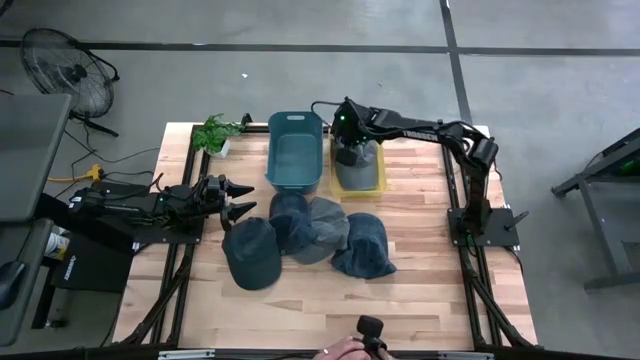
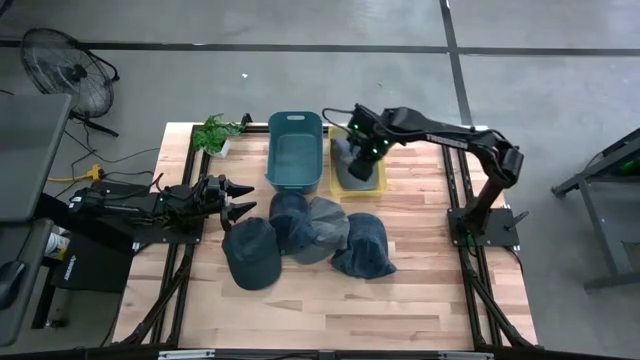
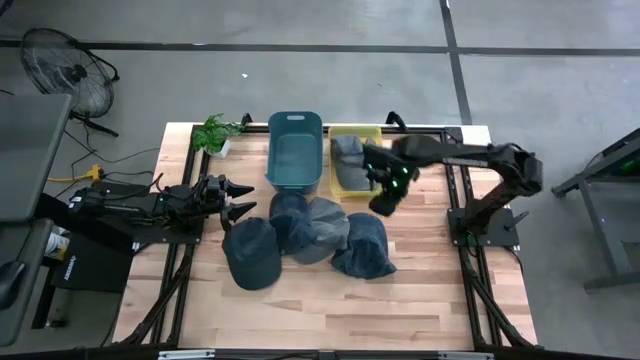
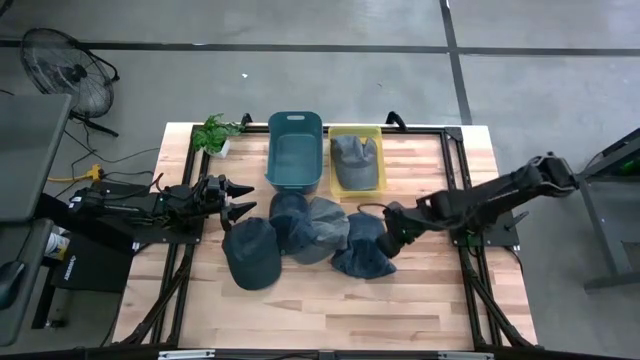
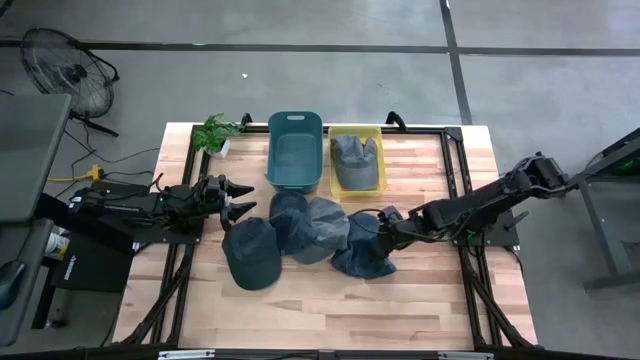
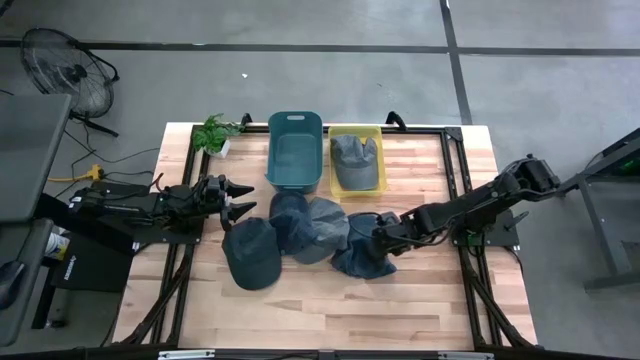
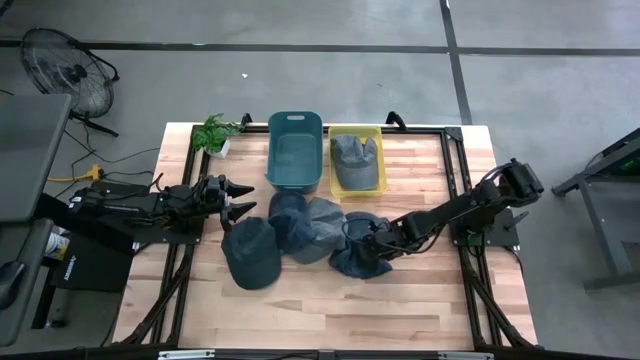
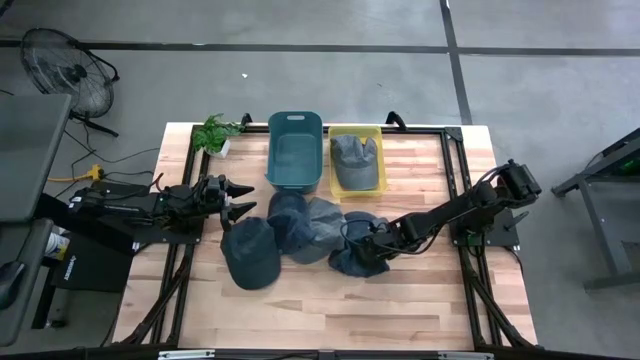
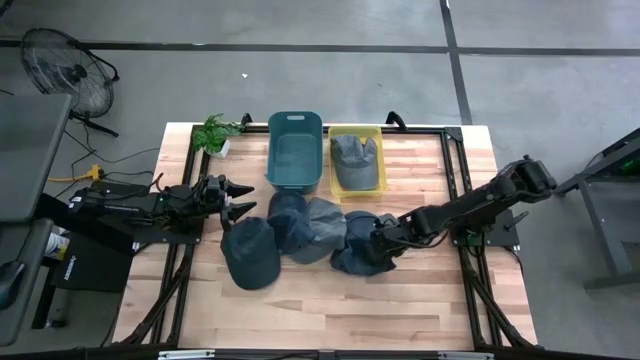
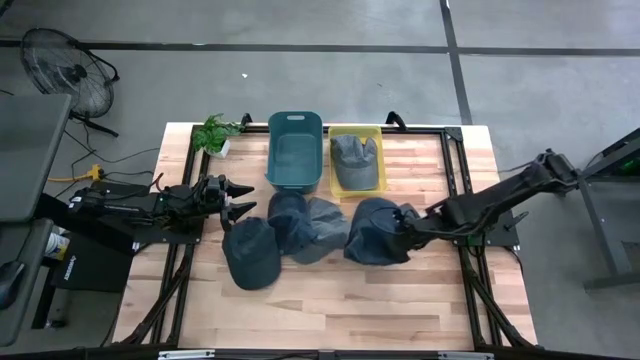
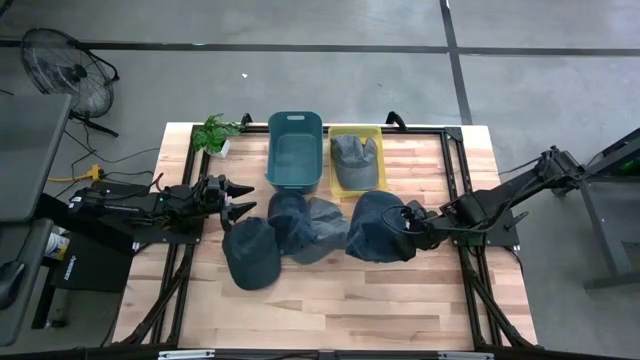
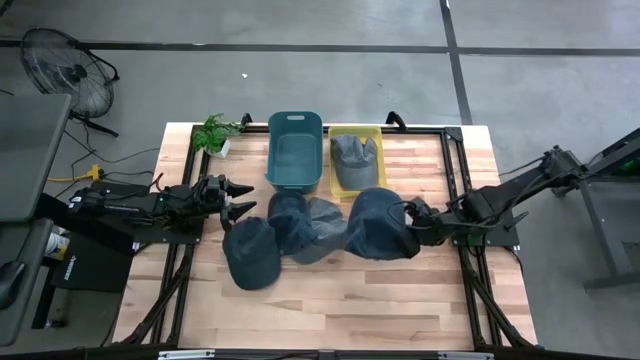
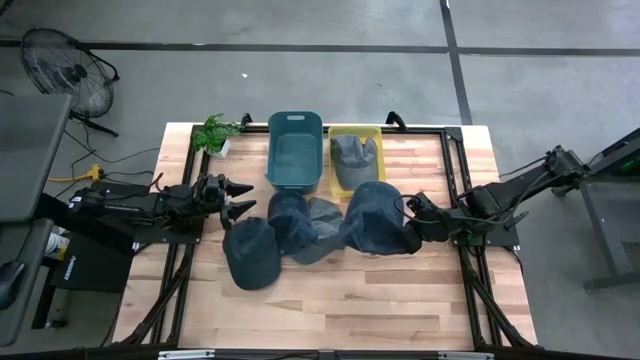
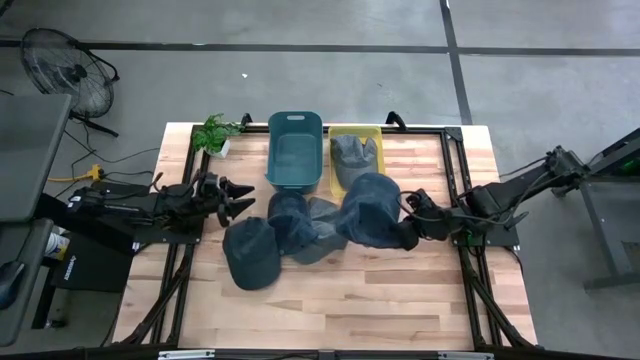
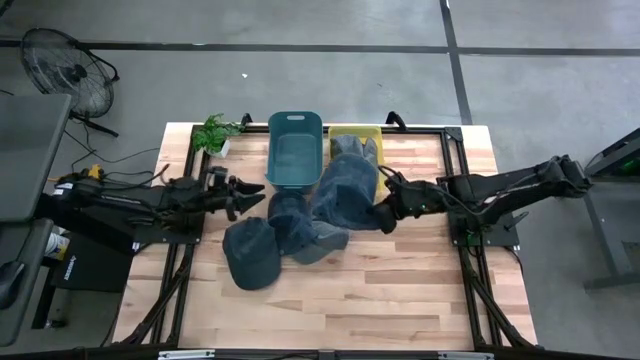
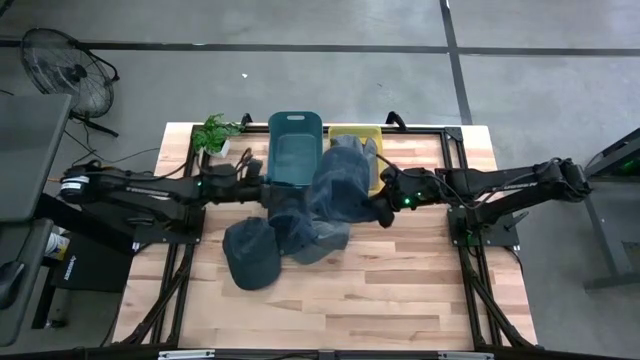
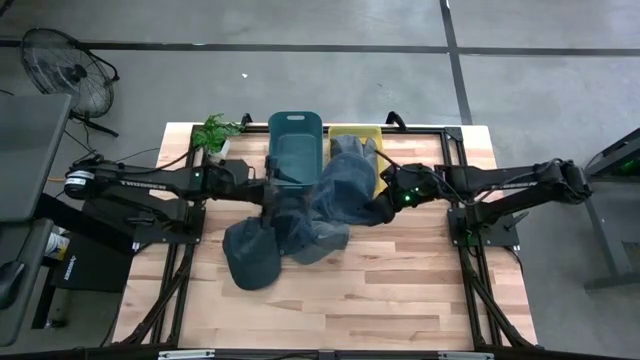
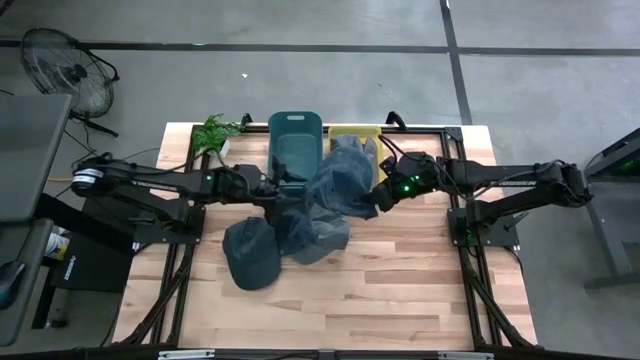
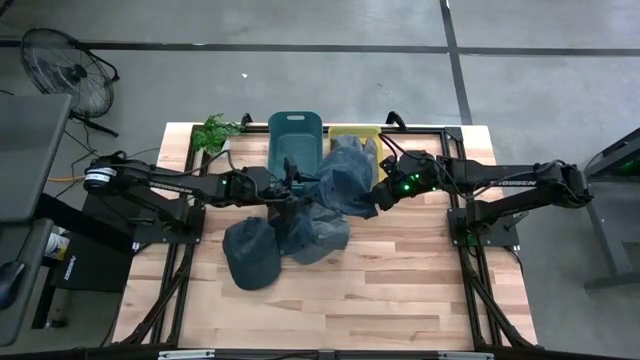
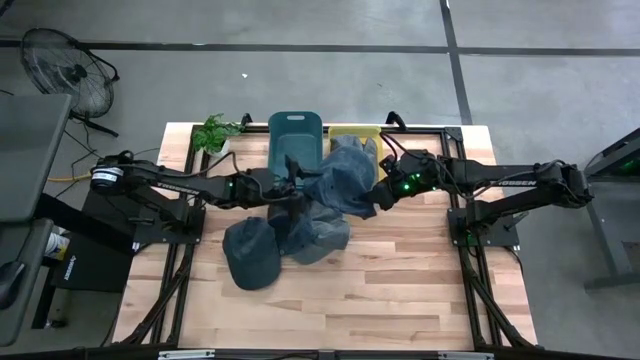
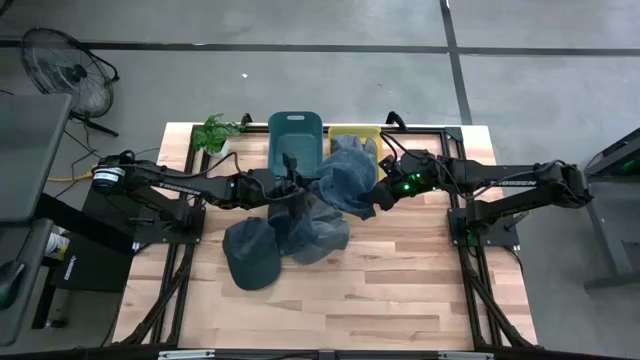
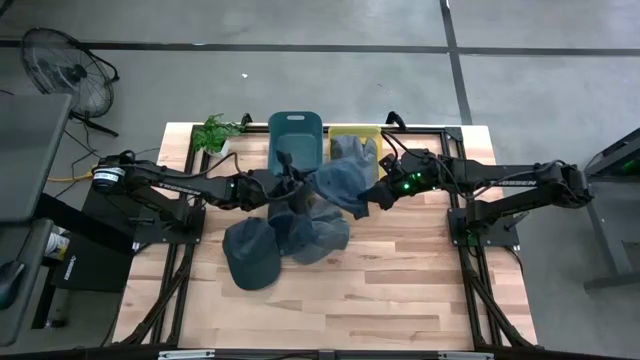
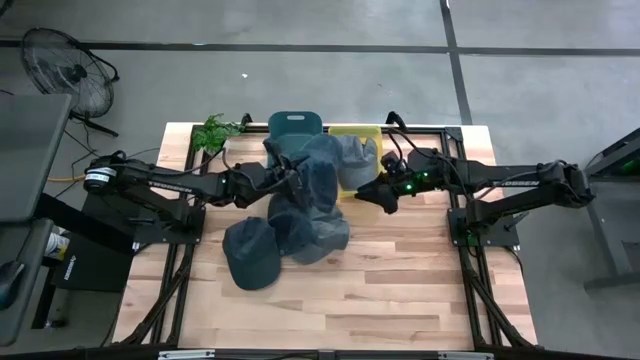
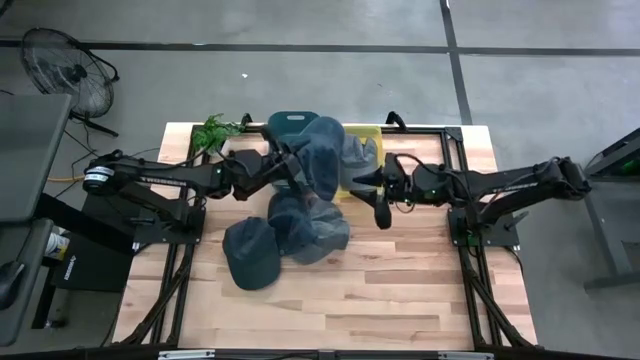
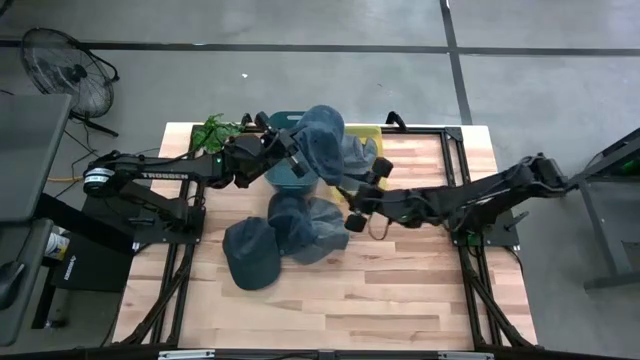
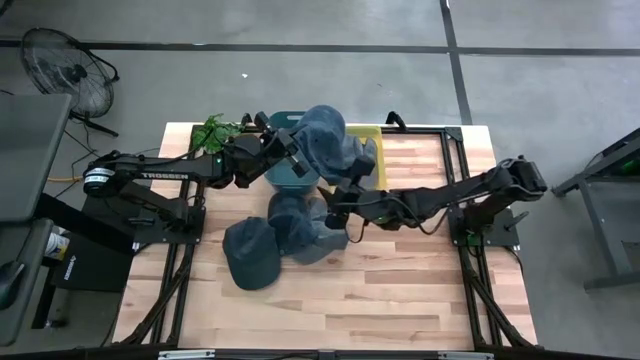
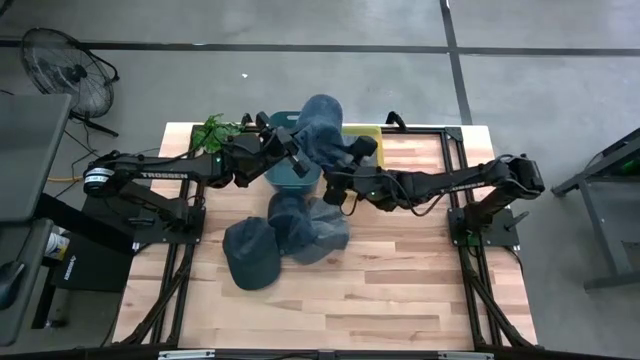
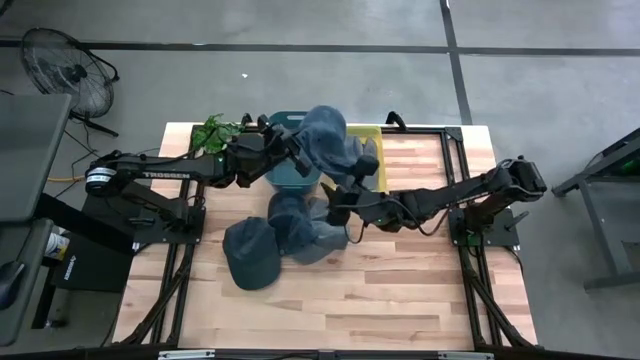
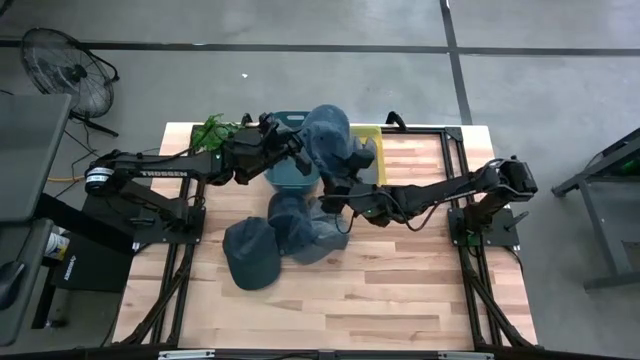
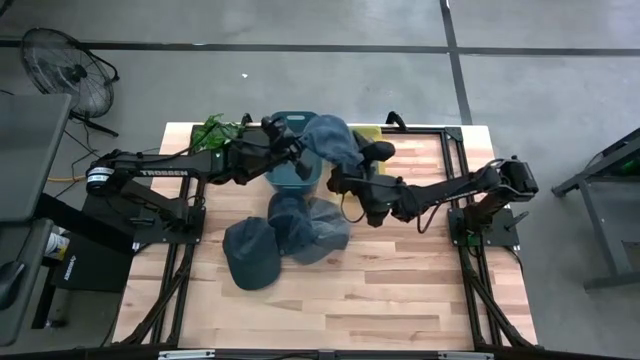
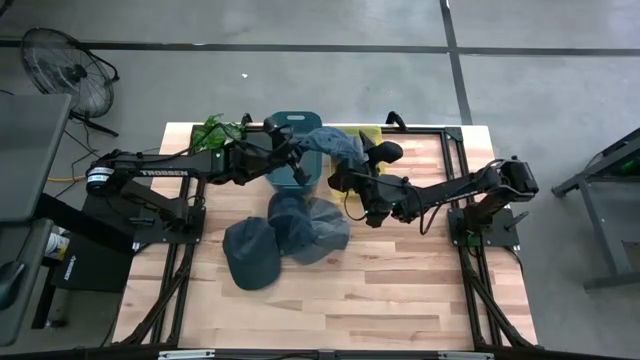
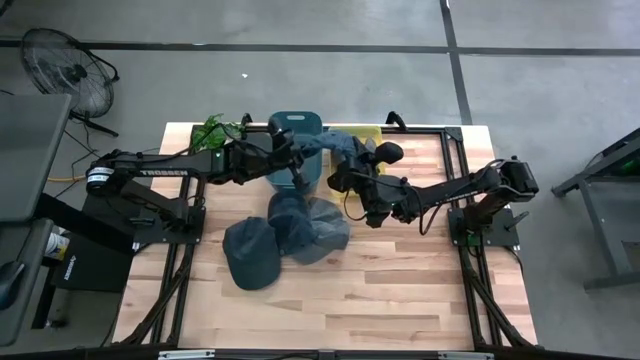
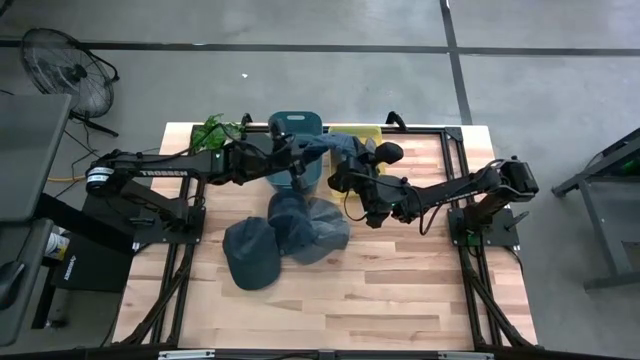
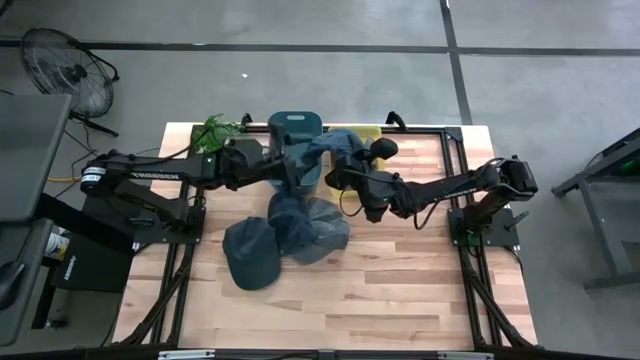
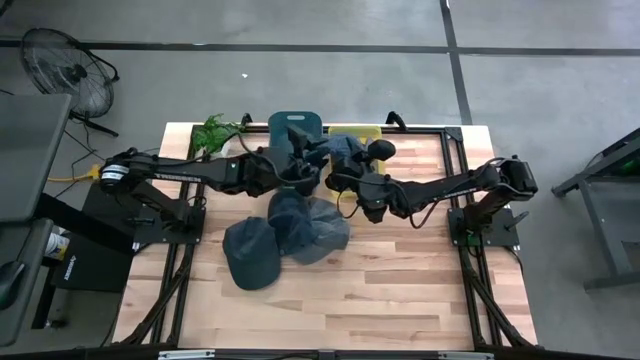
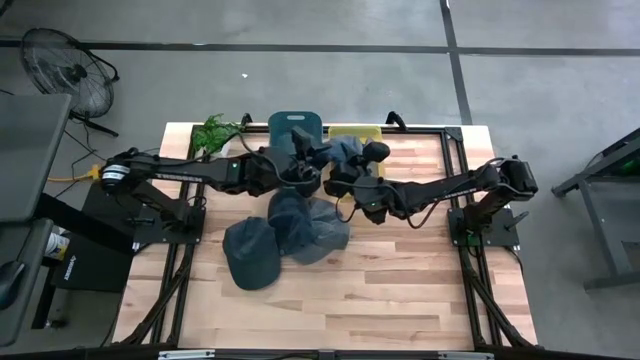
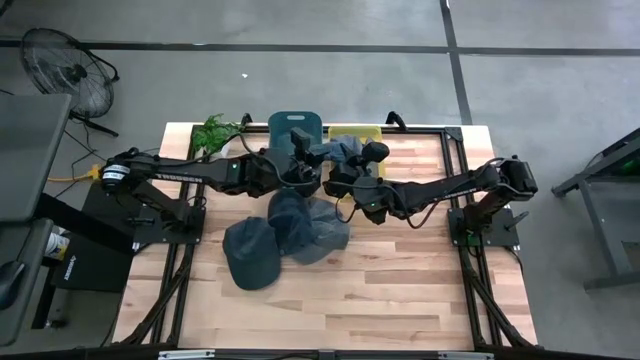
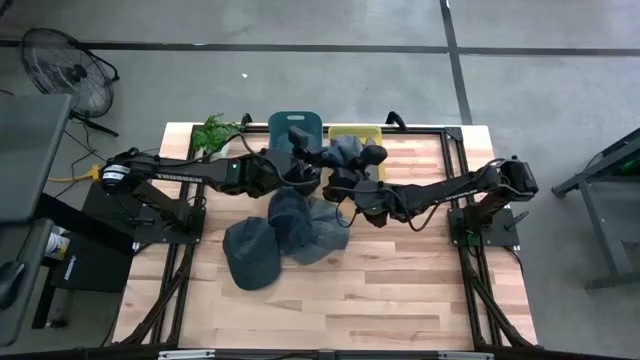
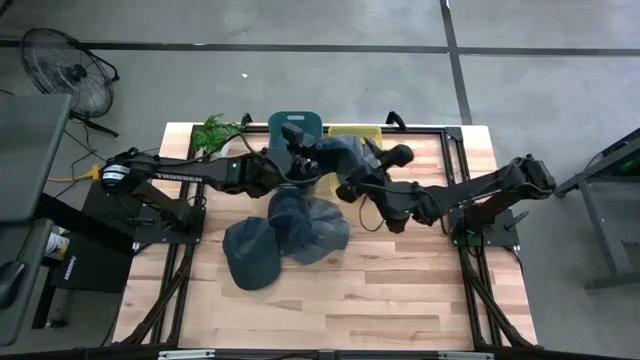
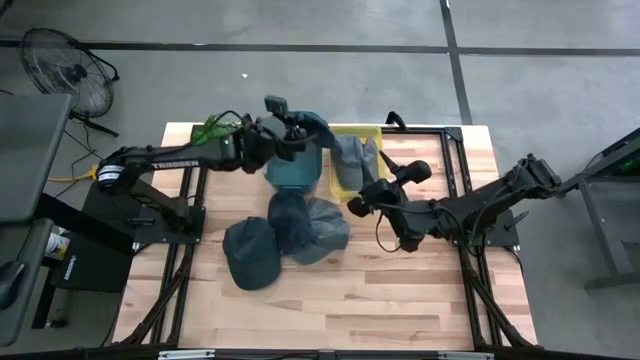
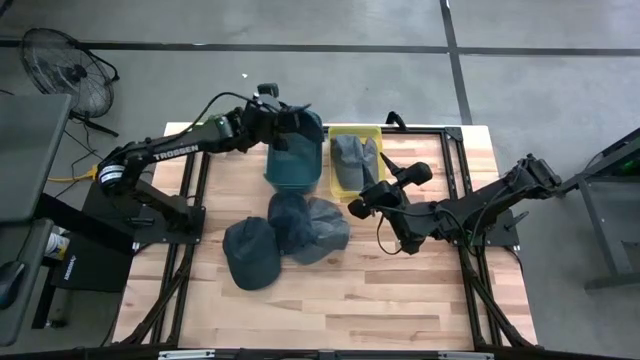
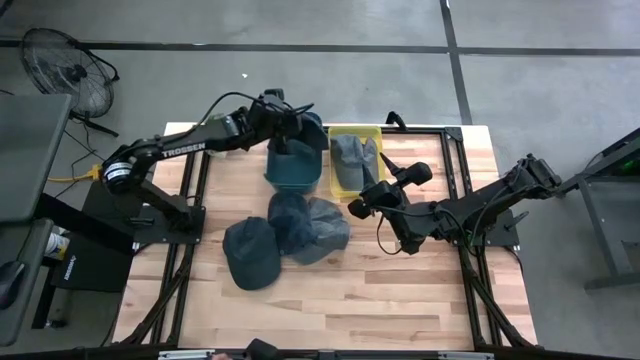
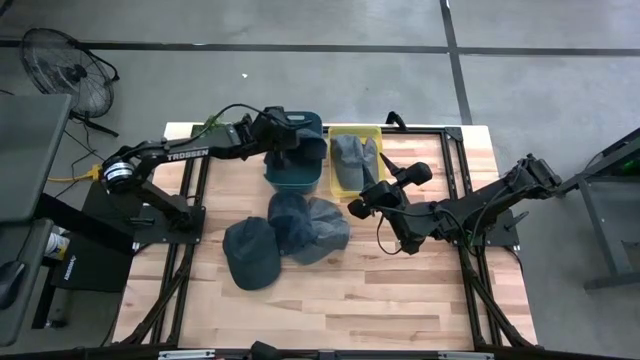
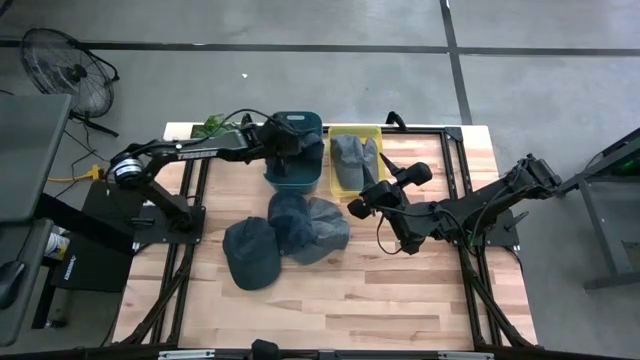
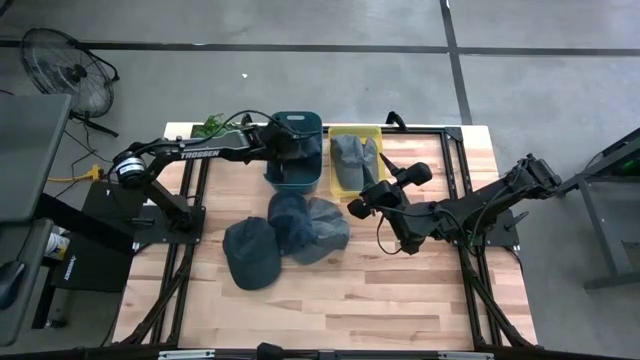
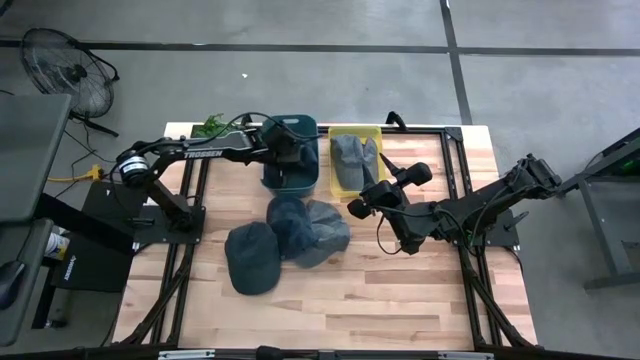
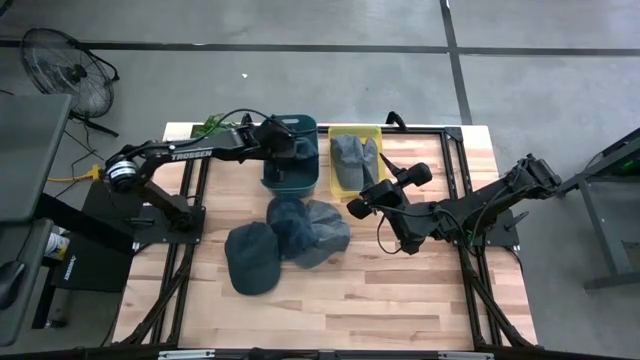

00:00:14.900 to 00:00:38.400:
Task: Pick & Place hat
Put the right blue cap into the blue bin
